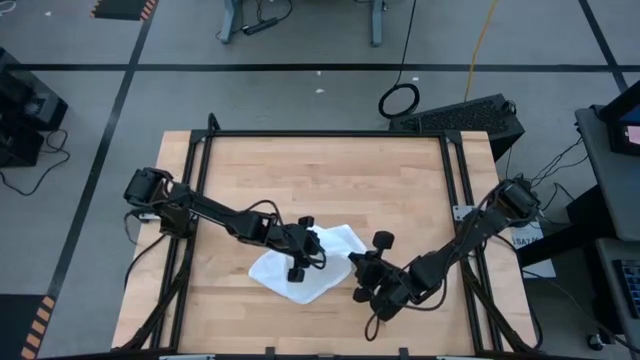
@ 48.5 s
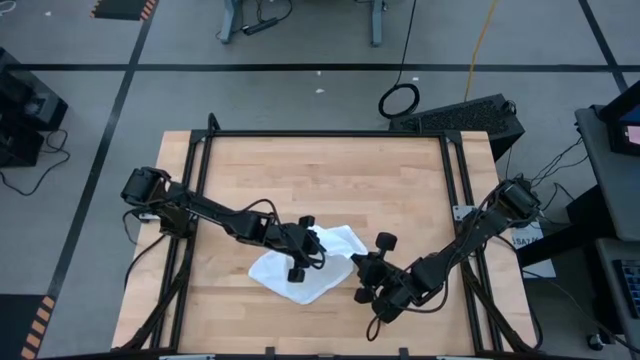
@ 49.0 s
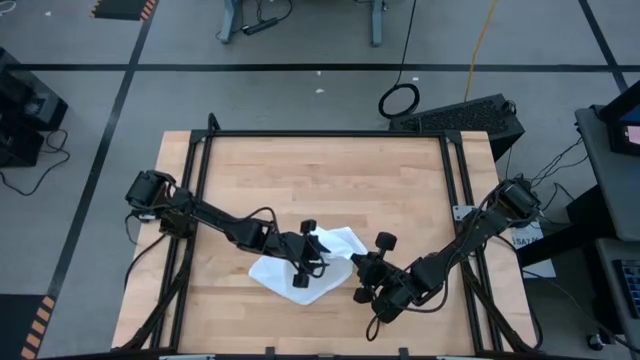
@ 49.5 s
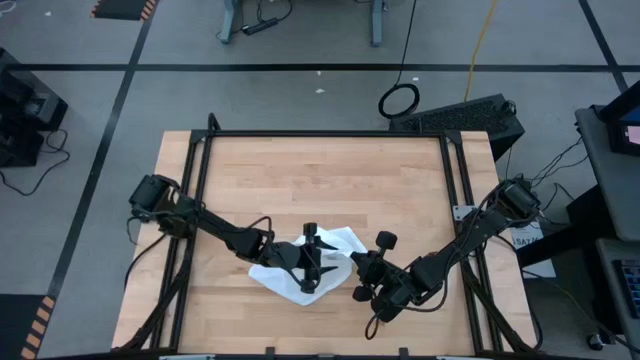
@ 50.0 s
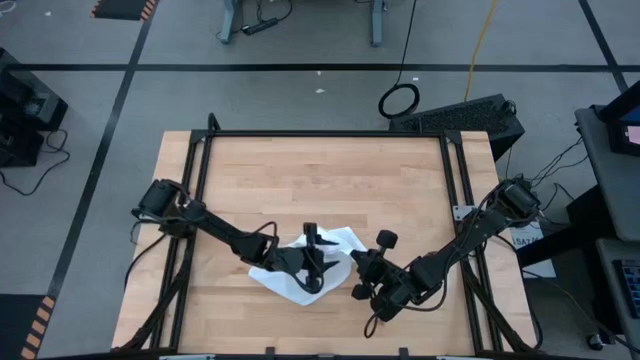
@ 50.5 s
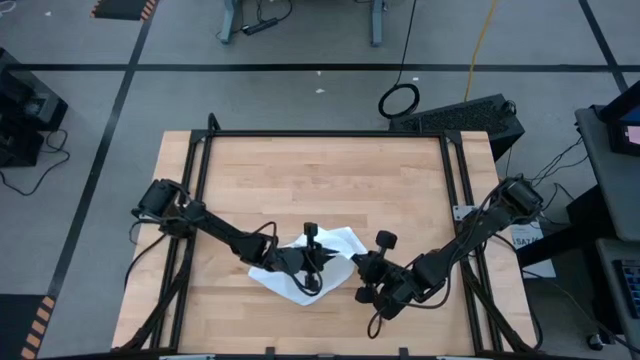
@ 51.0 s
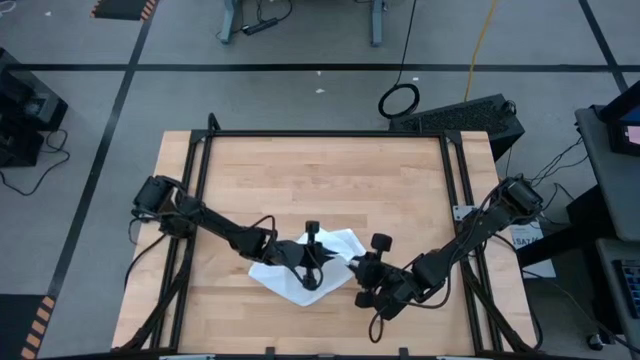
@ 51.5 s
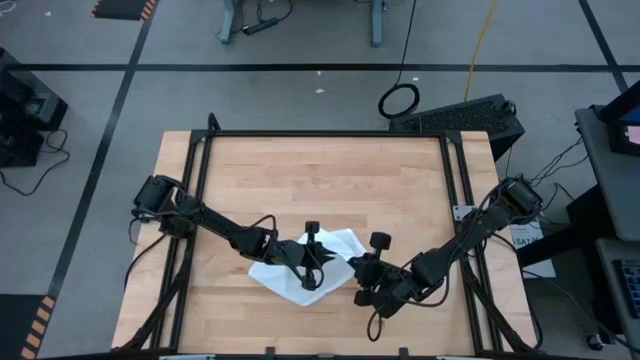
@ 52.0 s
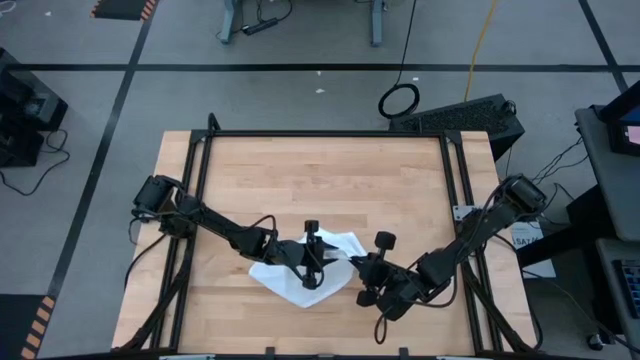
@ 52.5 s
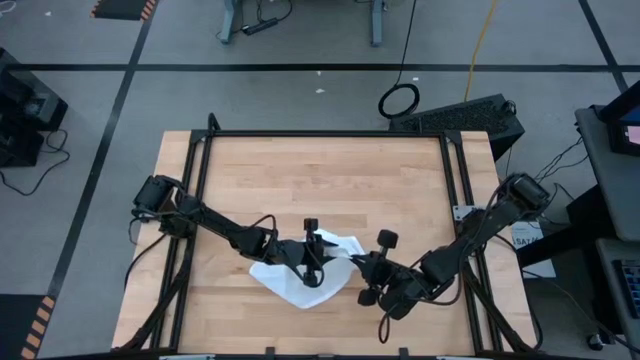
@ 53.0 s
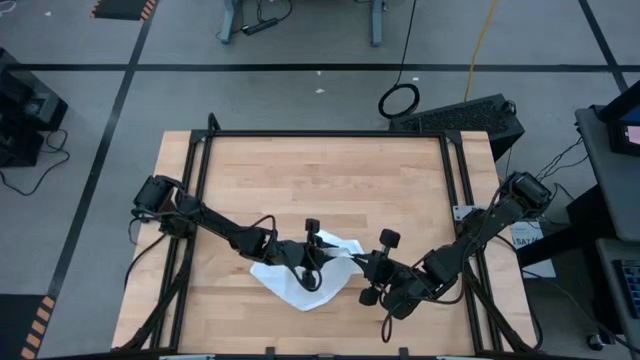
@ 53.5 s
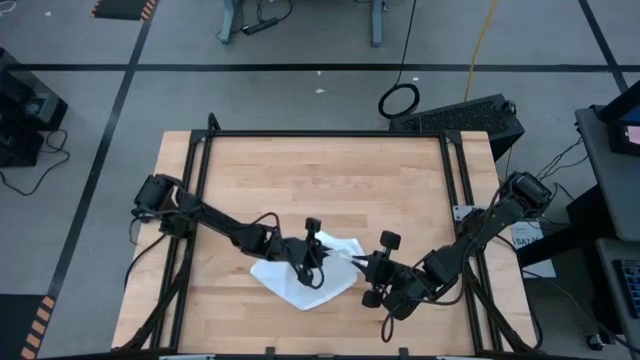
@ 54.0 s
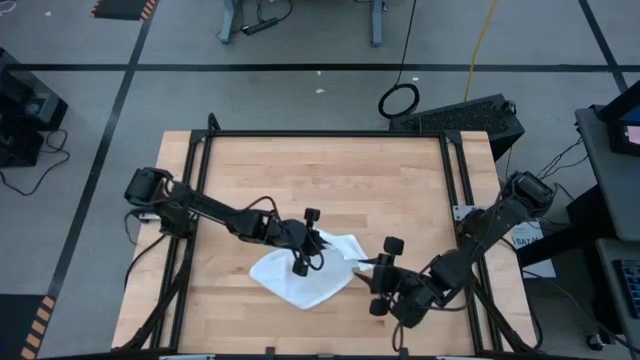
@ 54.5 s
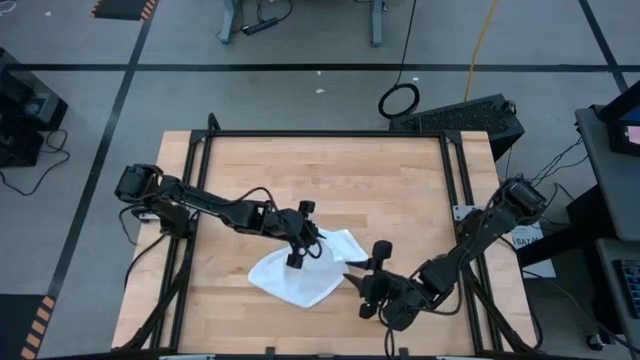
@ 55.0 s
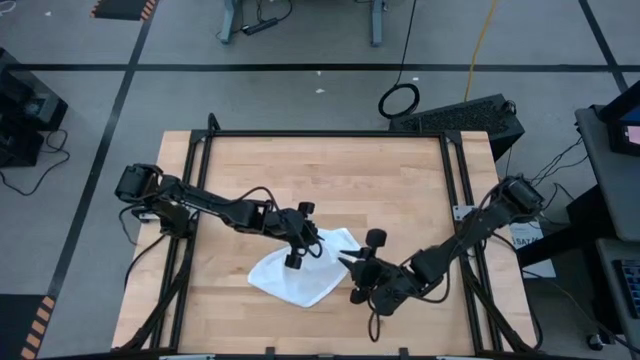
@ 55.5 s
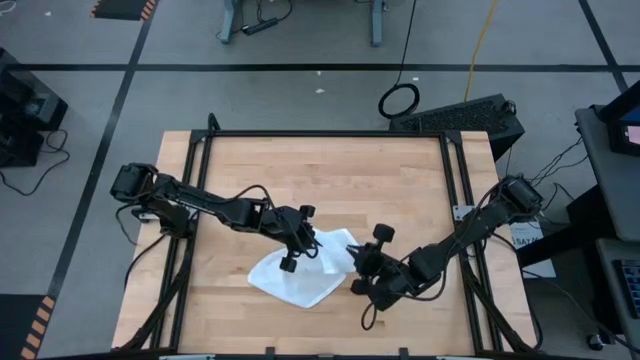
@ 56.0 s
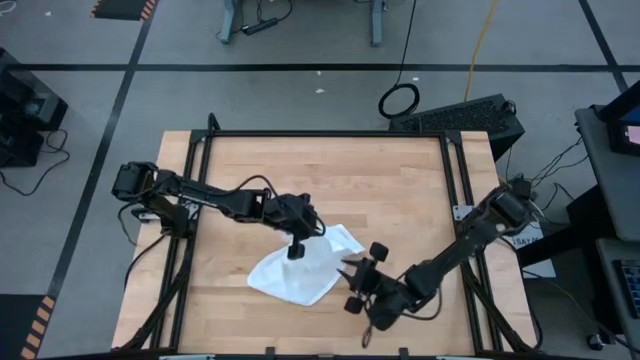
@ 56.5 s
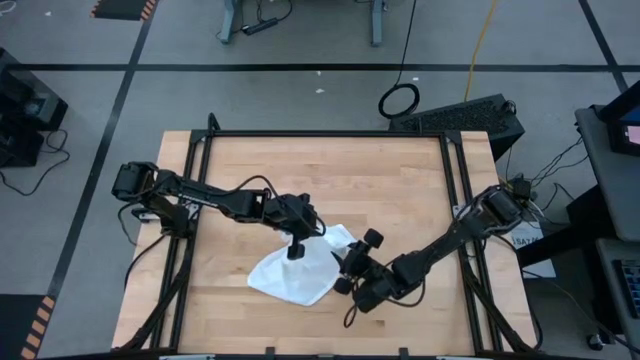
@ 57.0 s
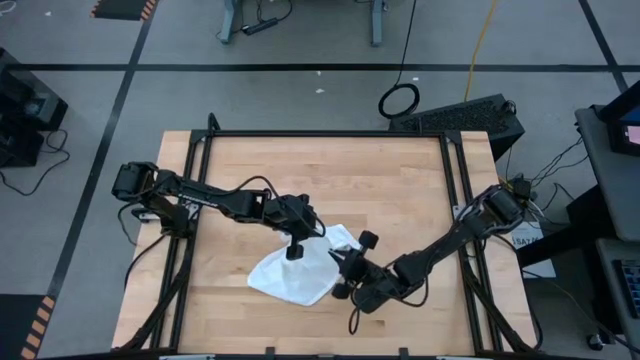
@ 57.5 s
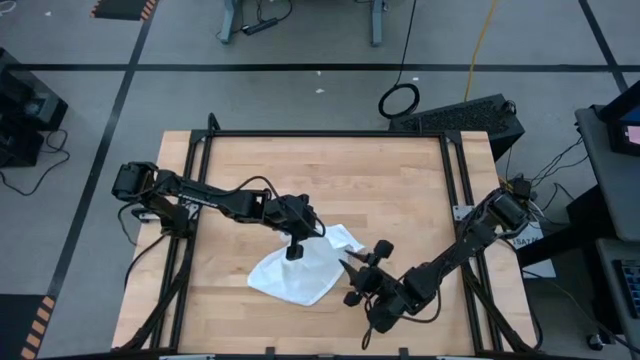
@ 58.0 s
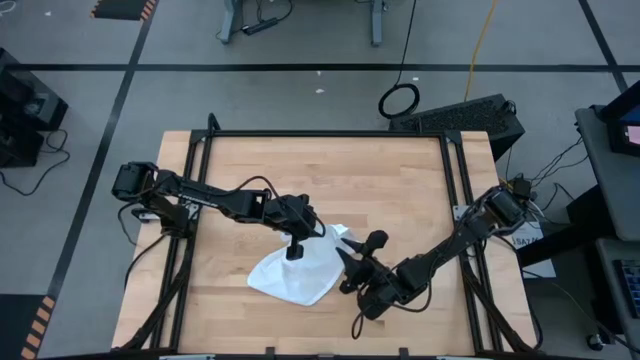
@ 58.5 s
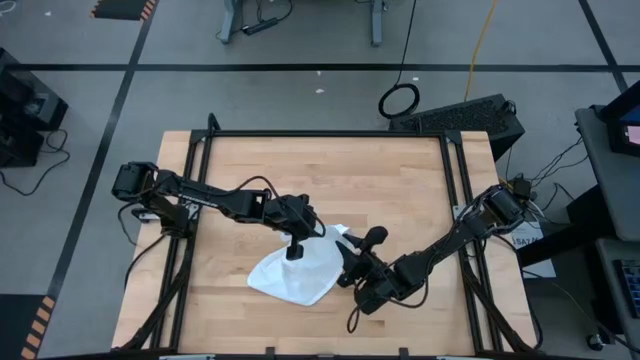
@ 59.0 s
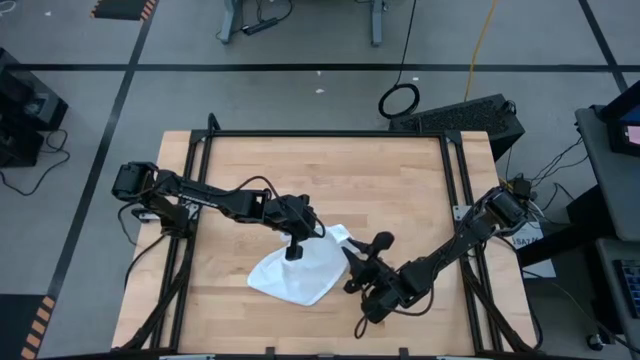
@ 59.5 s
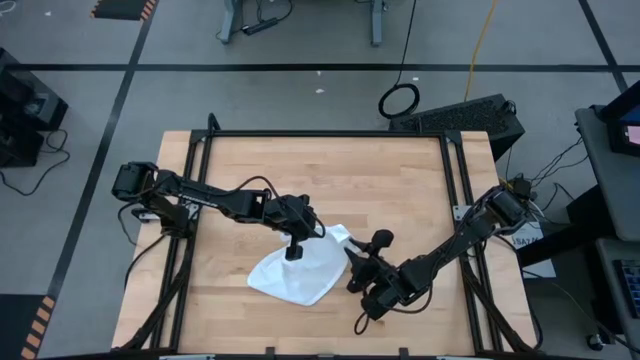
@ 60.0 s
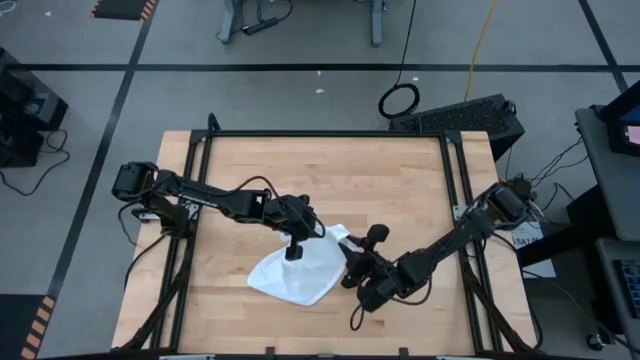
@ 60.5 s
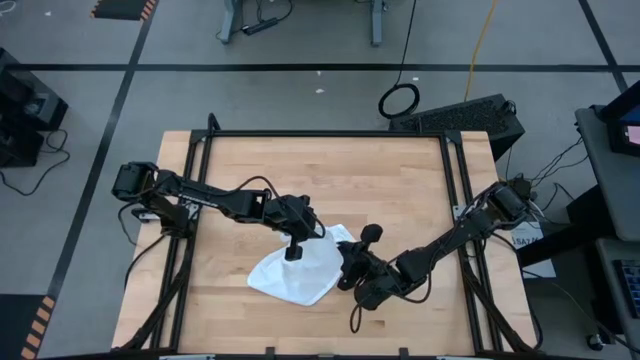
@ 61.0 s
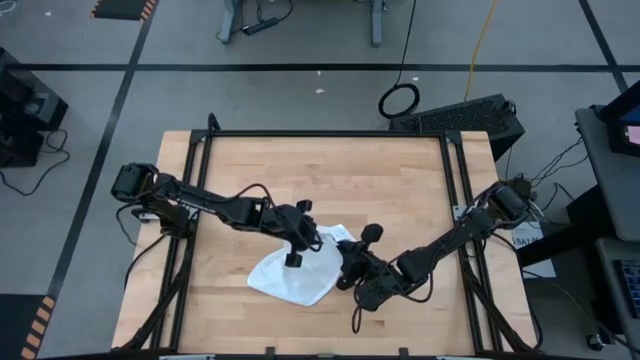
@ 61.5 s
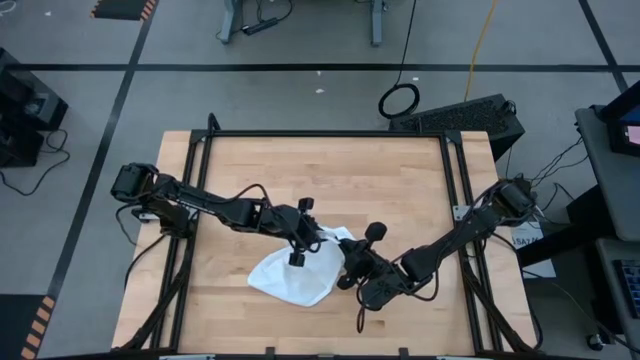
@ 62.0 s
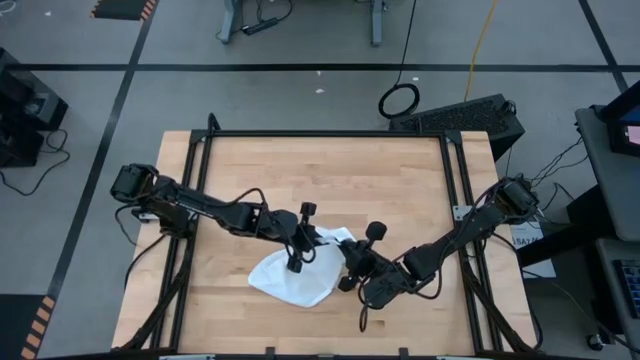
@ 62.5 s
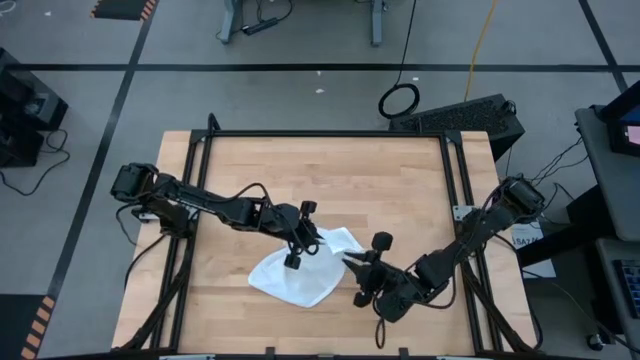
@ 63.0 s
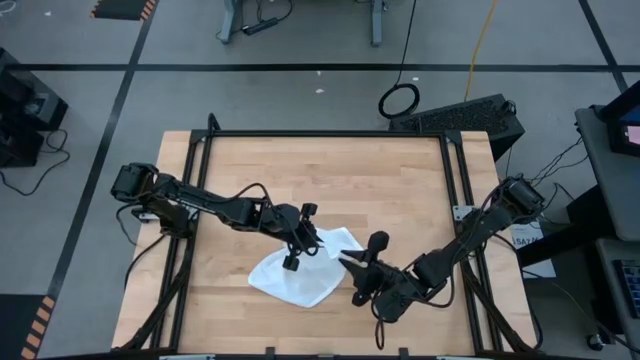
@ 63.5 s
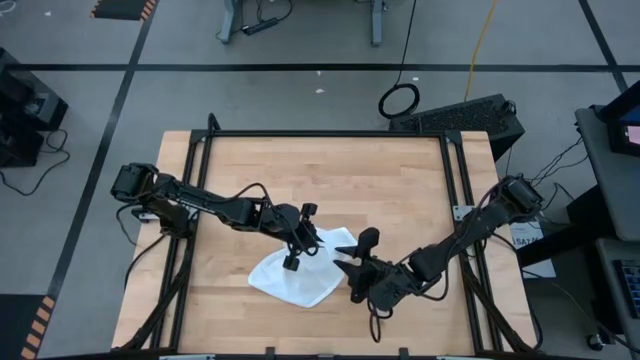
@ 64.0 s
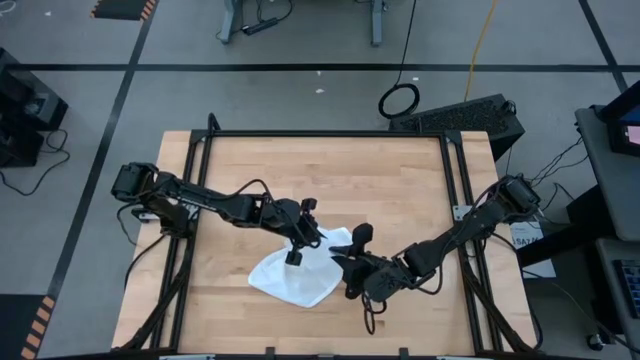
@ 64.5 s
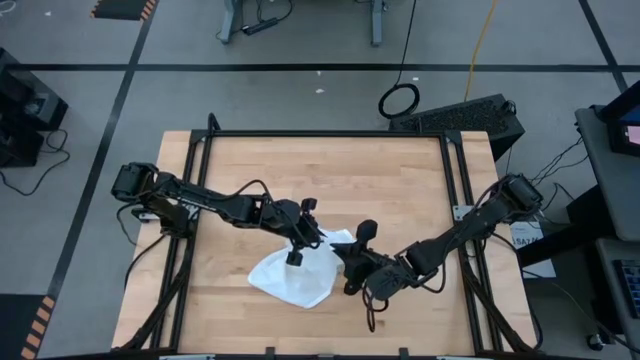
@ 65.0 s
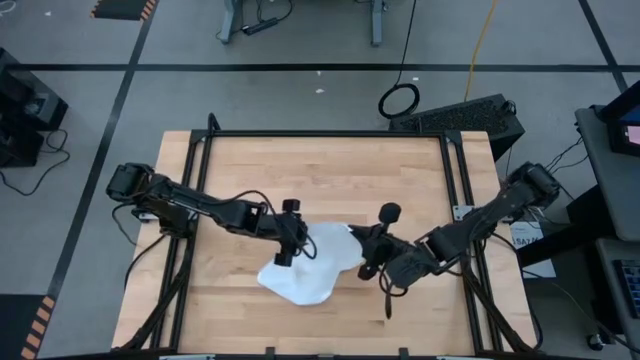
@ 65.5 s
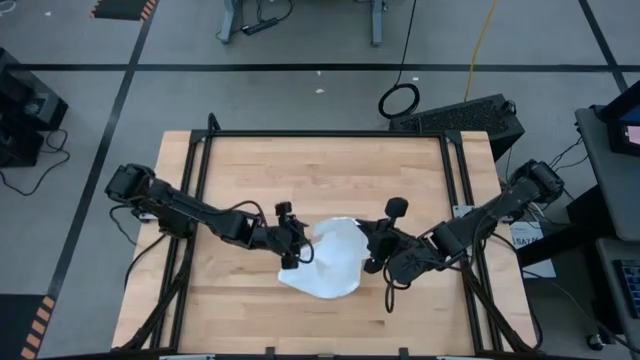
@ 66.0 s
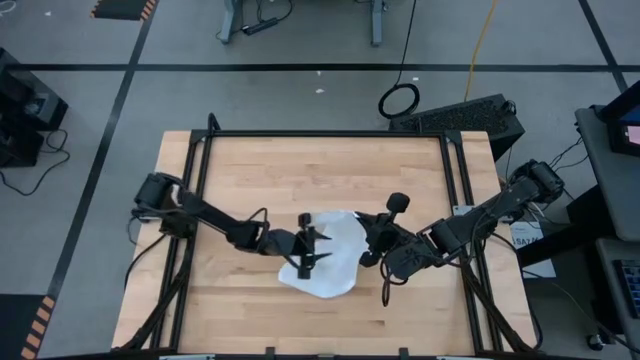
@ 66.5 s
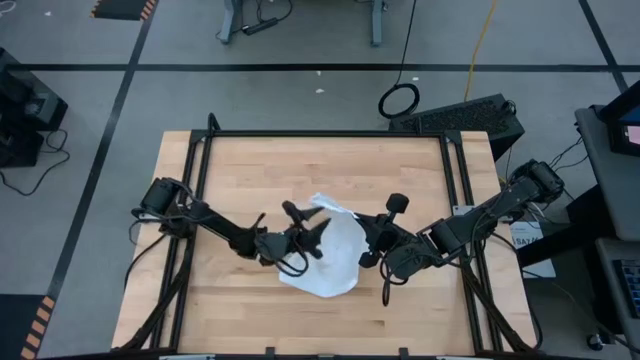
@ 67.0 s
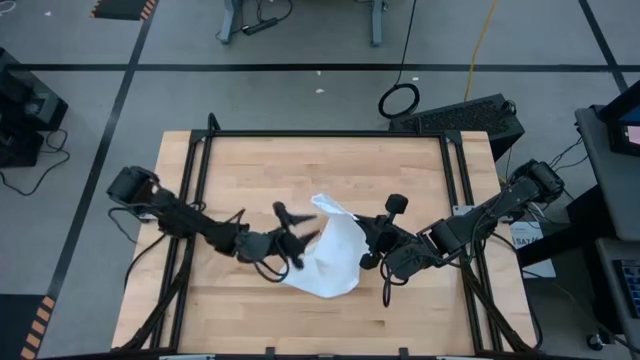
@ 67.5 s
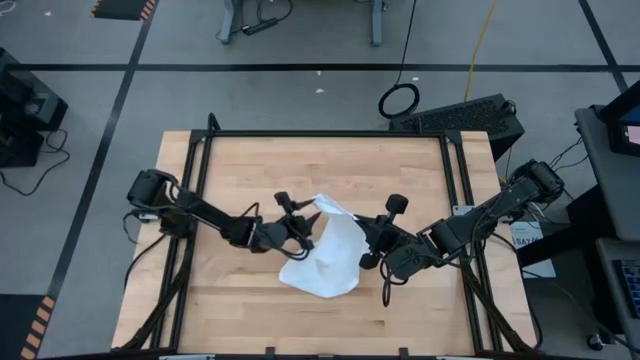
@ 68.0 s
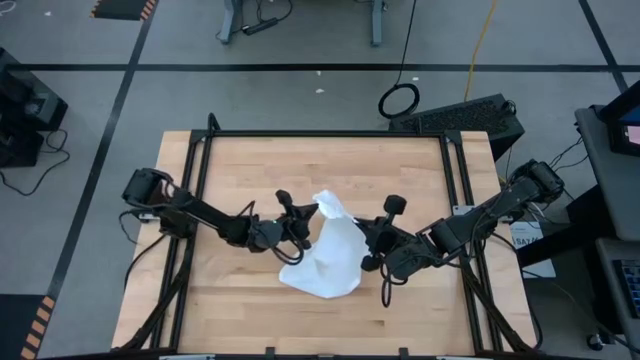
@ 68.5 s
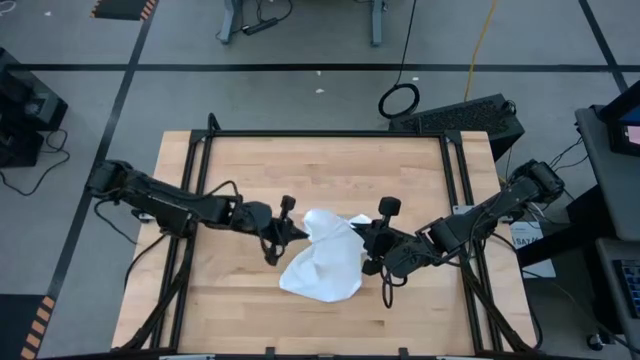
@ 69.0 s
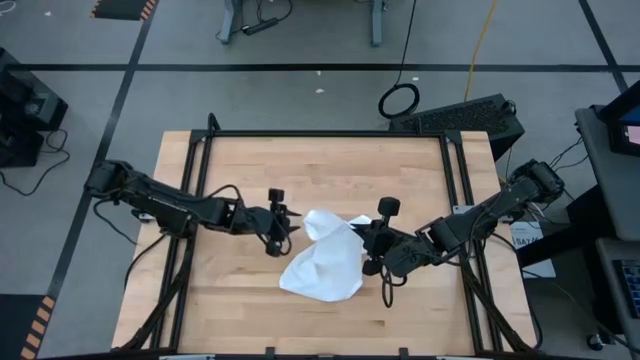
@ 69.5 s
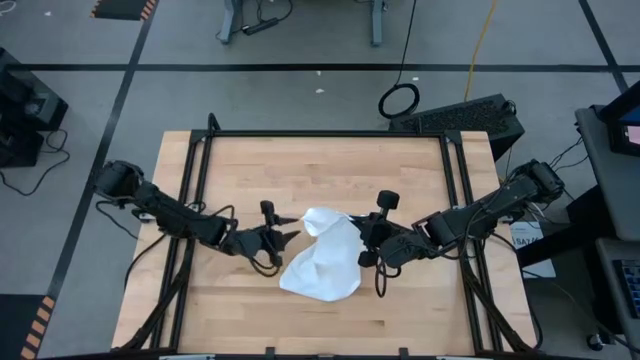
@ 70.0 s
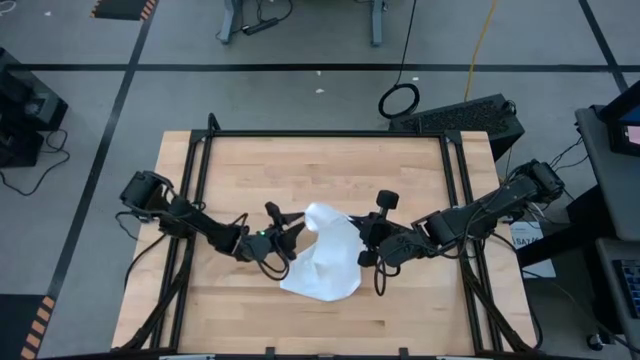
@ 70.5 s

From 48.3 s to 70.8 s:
Task: Roll towel
Roll the white towel
